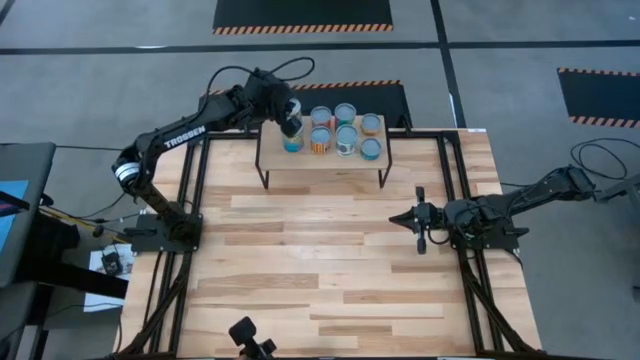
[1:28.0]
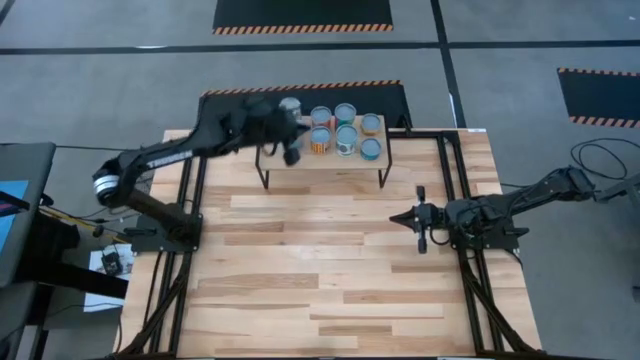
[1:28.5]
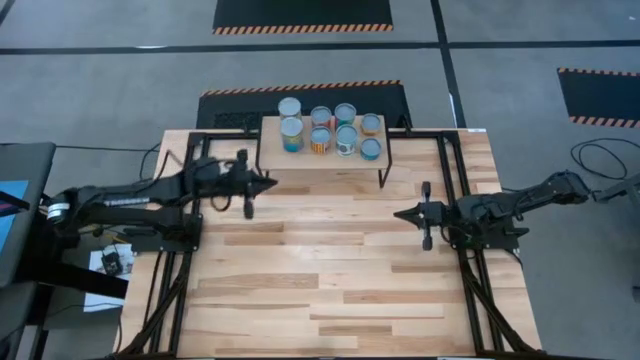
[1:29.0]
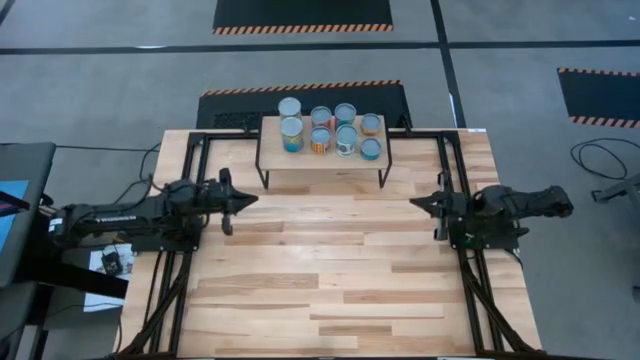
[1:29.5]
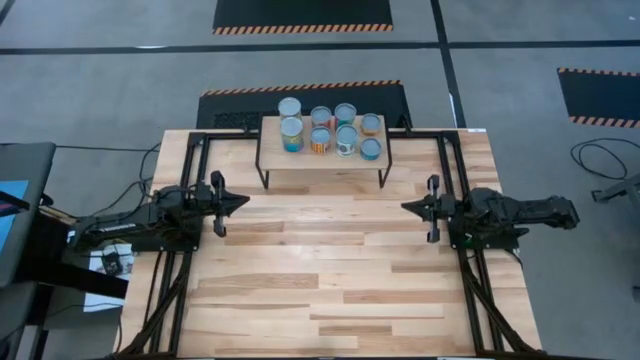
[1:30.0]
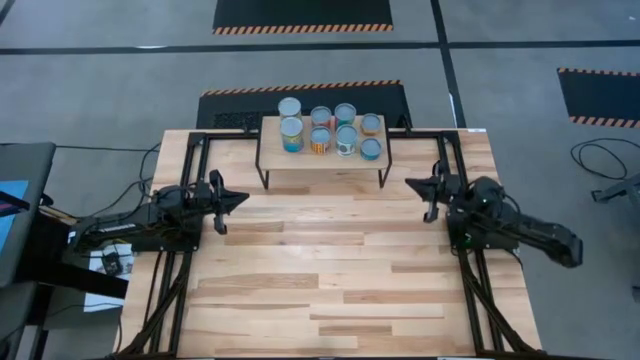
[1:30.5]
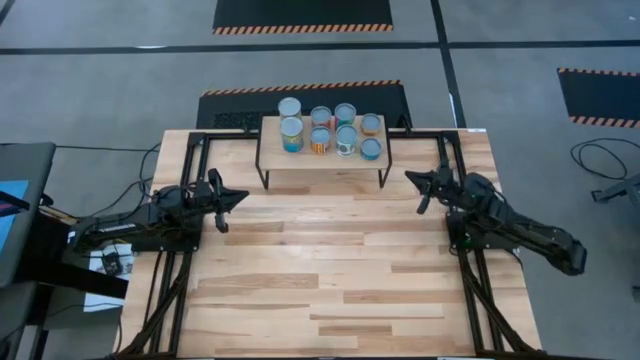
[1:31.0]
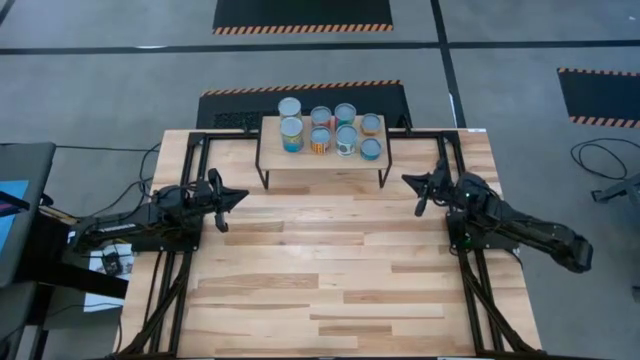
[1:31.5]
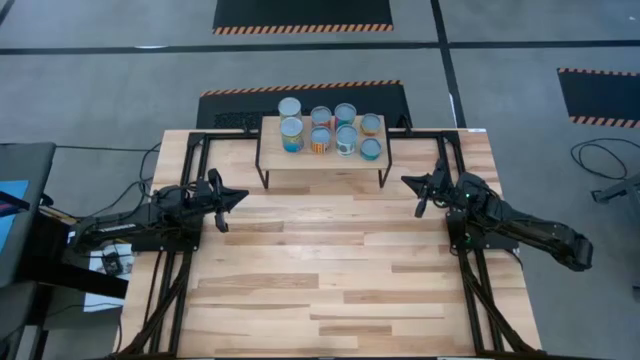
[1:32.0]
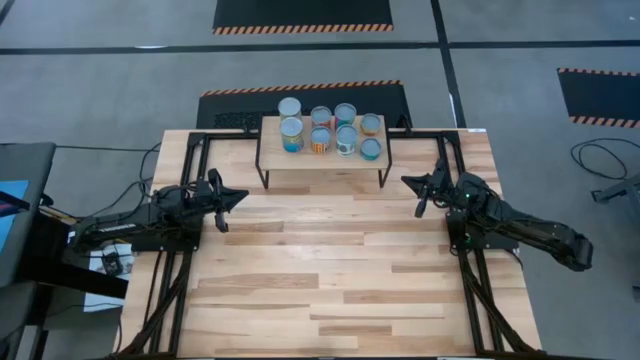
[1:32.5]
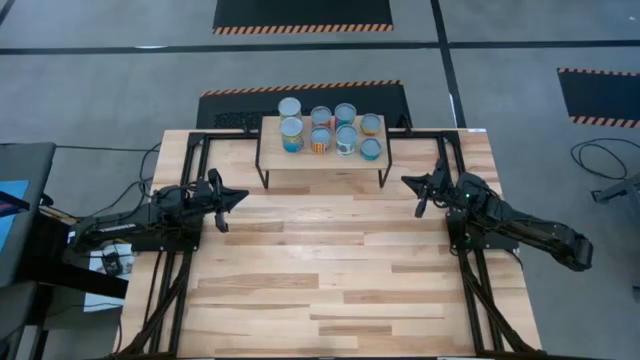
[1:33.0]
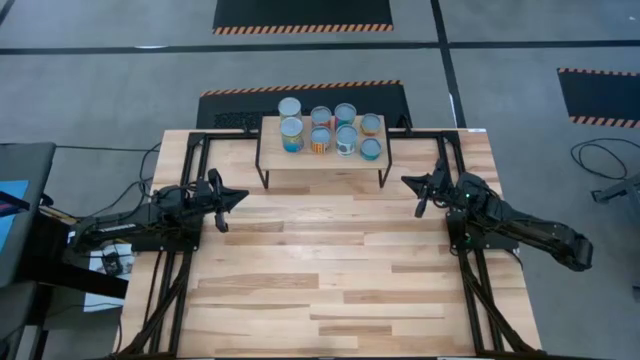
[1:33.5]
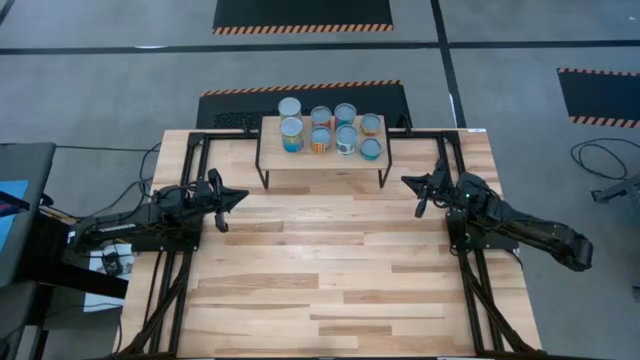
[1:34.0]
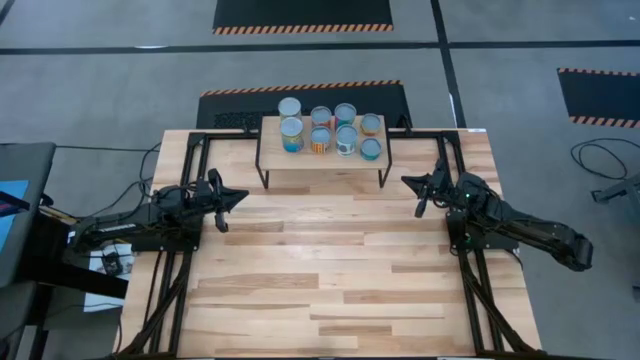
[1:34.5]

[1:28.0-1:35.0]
Task: Pick and place cans onto a shelf
Return to Home Position

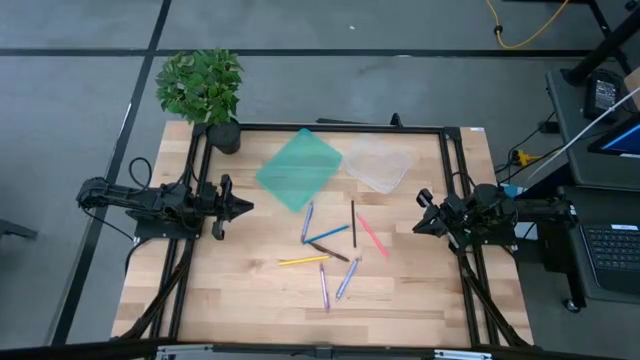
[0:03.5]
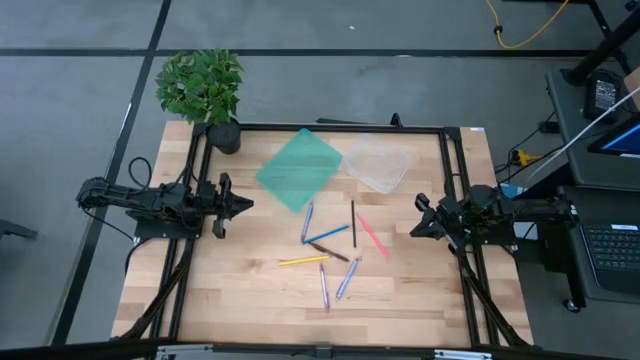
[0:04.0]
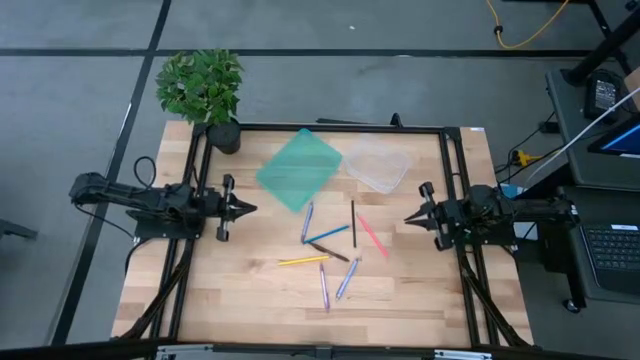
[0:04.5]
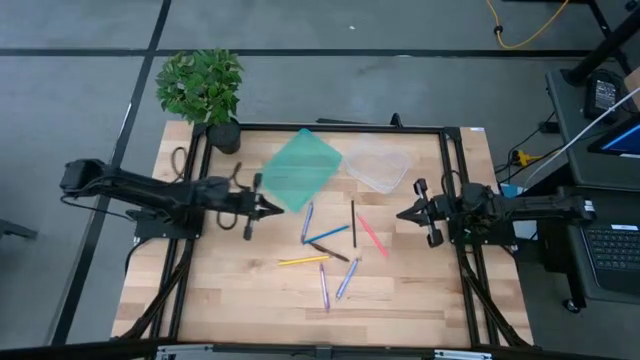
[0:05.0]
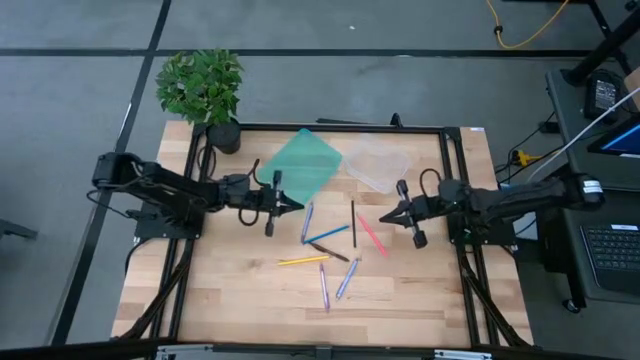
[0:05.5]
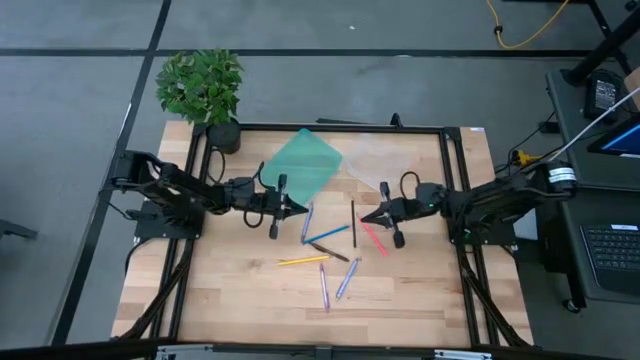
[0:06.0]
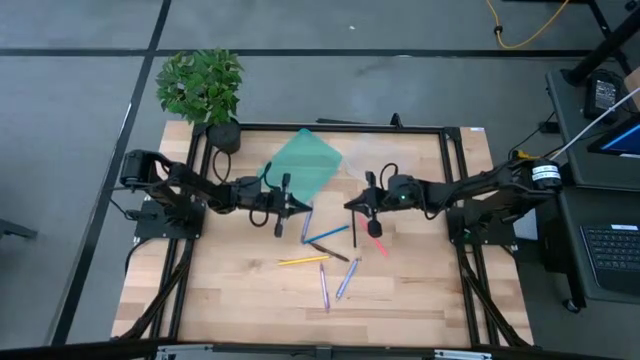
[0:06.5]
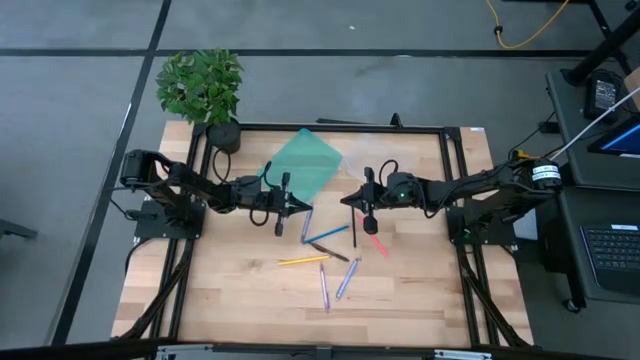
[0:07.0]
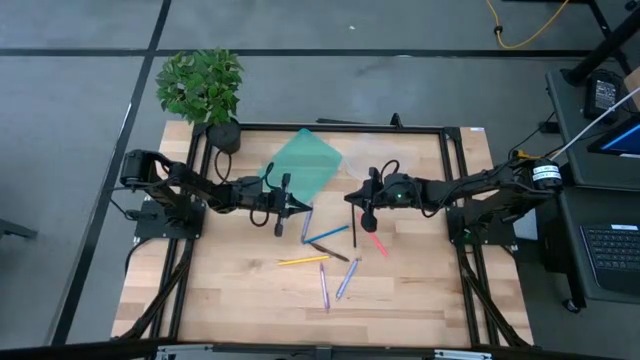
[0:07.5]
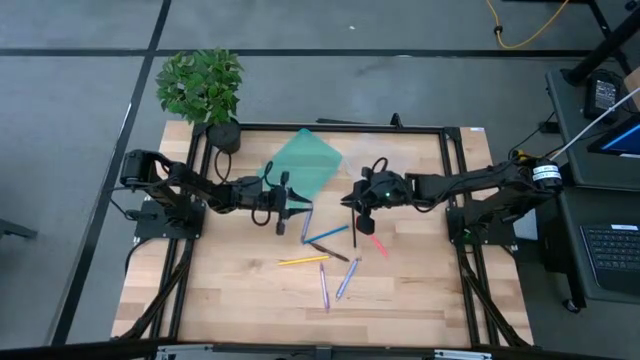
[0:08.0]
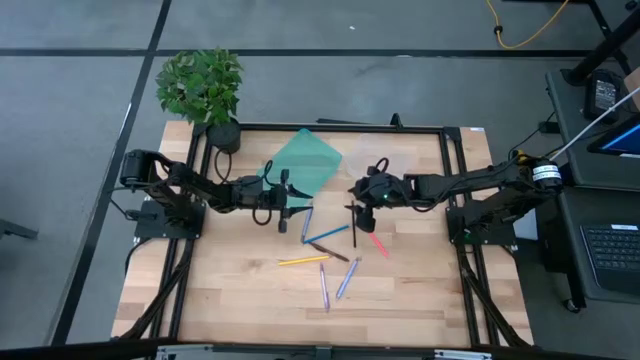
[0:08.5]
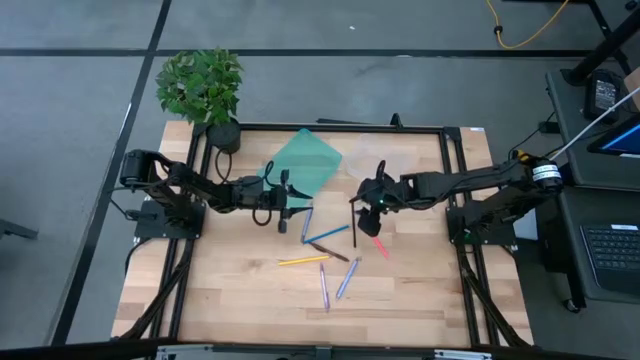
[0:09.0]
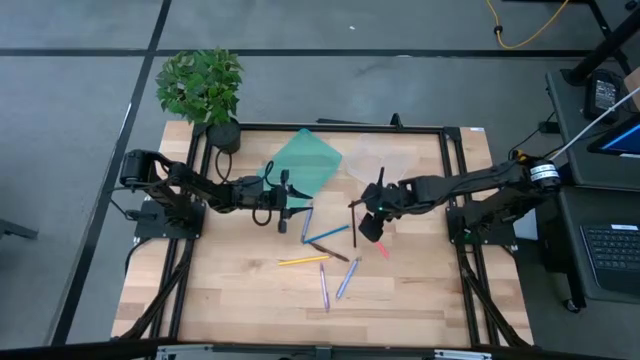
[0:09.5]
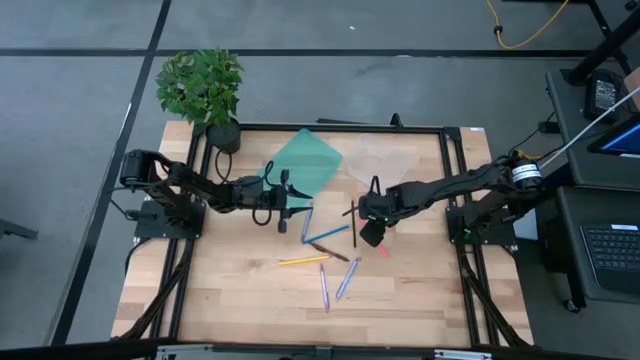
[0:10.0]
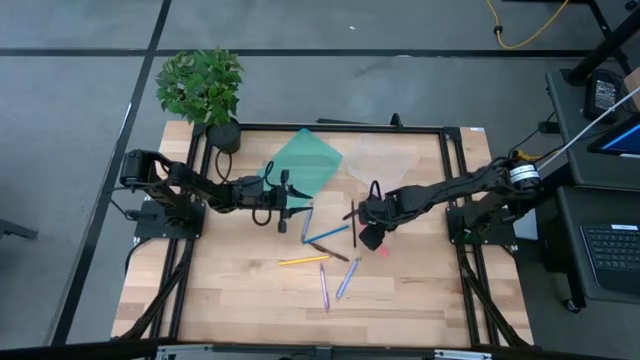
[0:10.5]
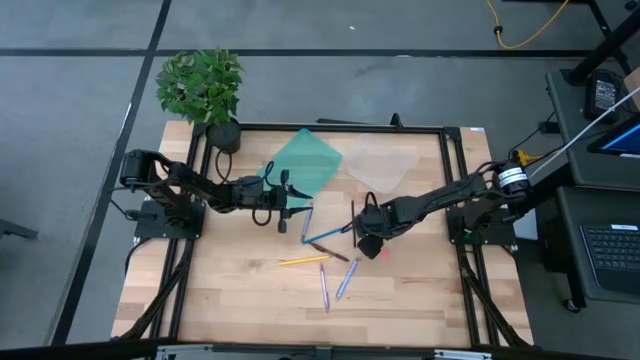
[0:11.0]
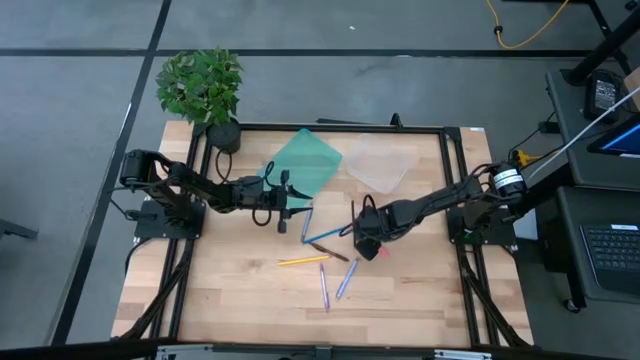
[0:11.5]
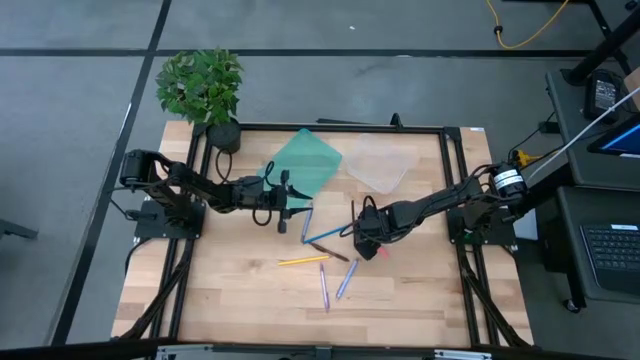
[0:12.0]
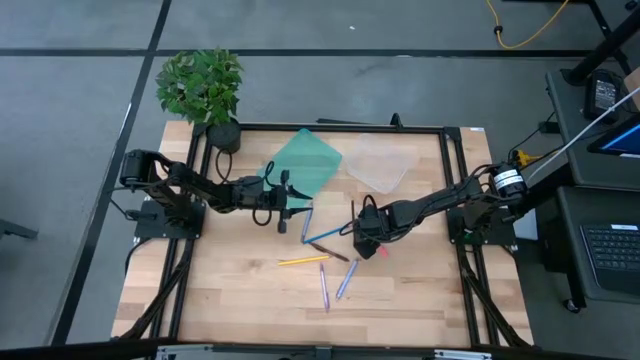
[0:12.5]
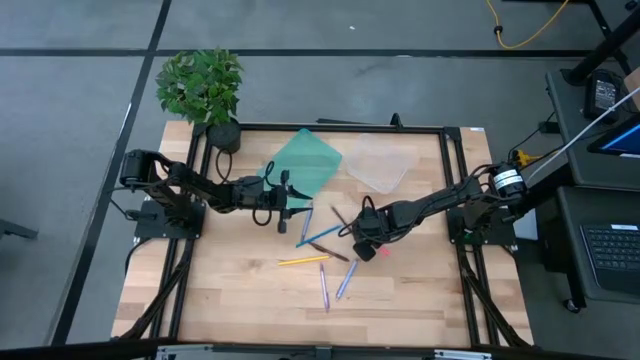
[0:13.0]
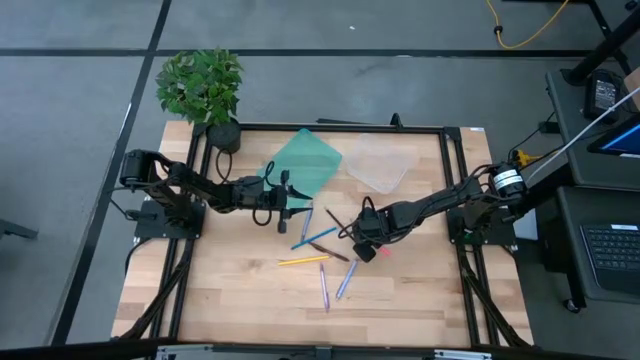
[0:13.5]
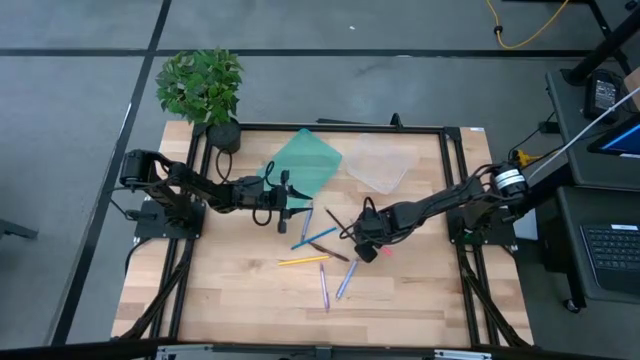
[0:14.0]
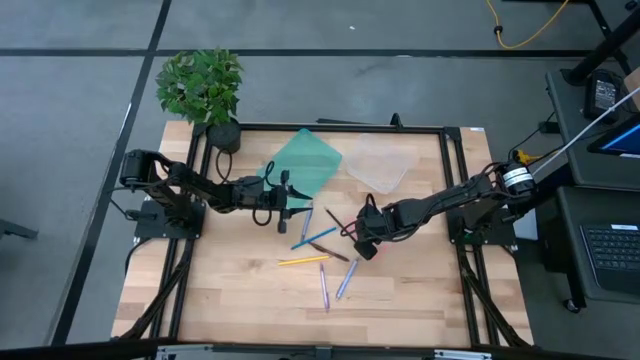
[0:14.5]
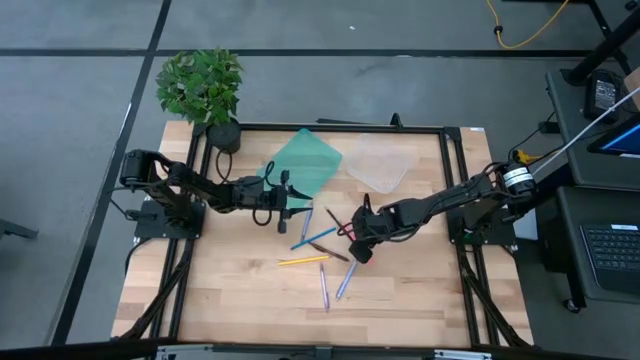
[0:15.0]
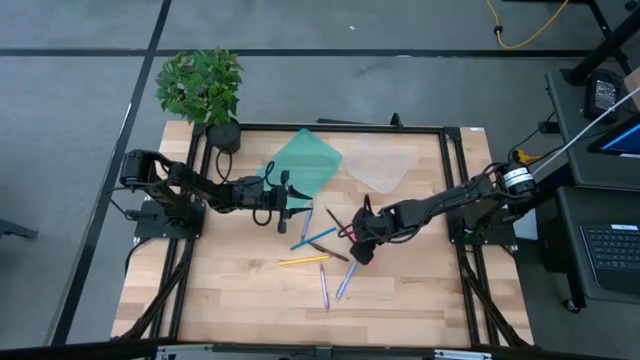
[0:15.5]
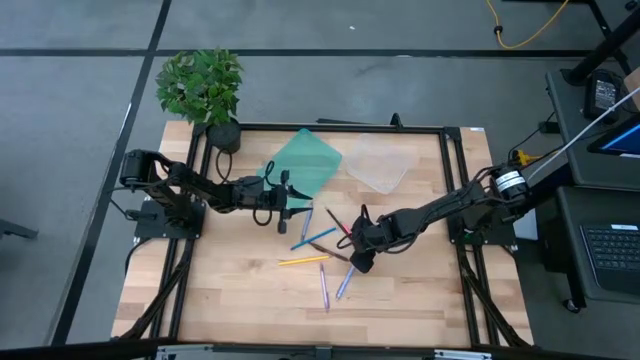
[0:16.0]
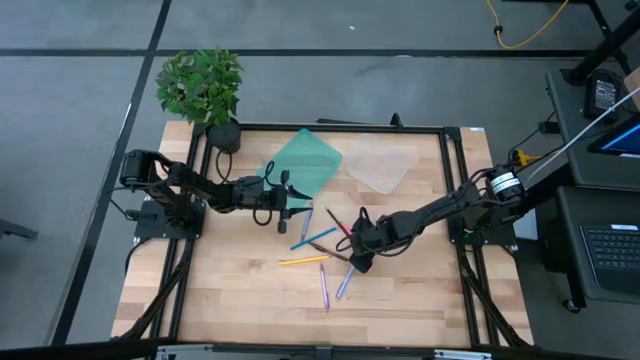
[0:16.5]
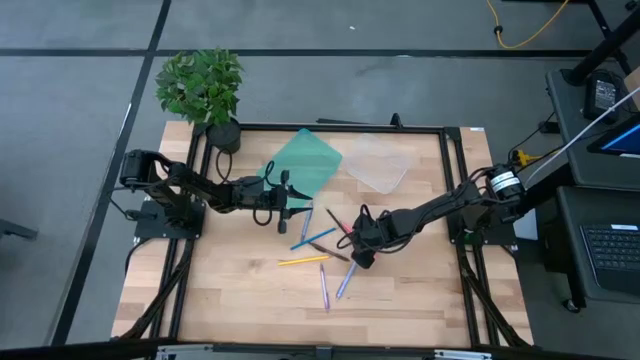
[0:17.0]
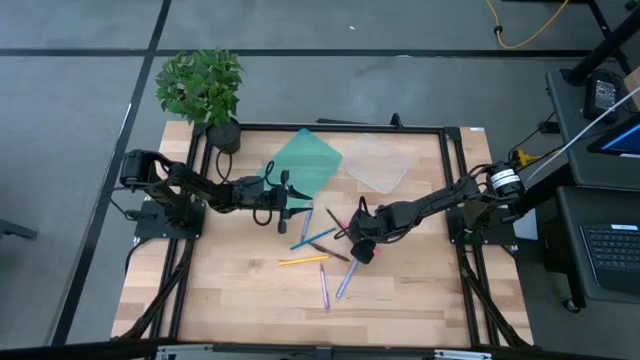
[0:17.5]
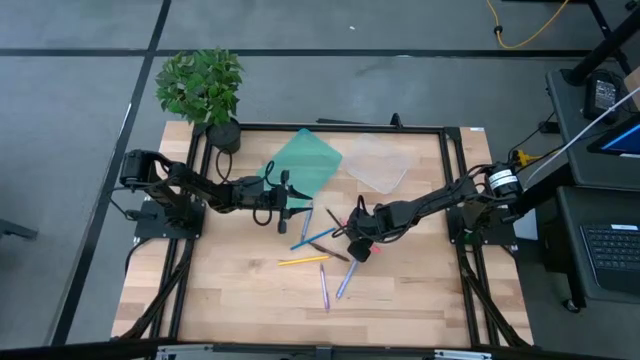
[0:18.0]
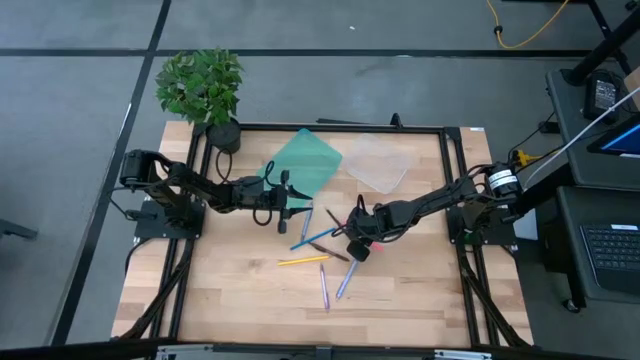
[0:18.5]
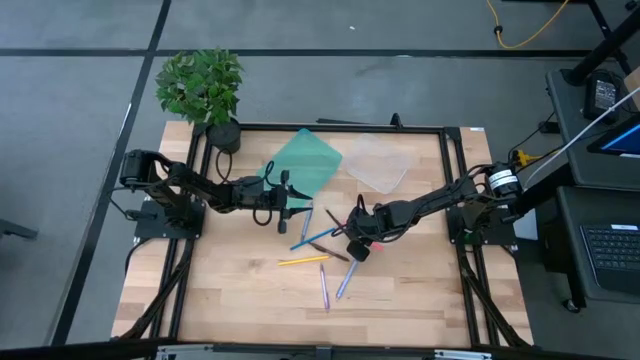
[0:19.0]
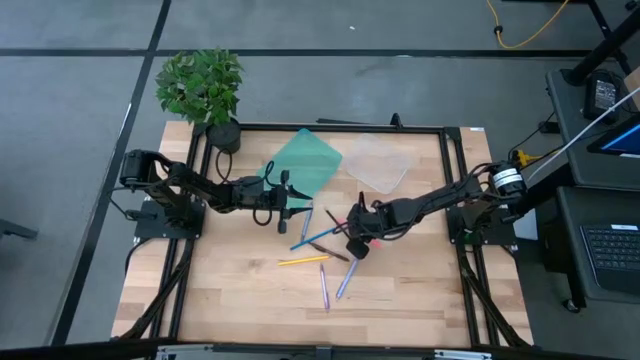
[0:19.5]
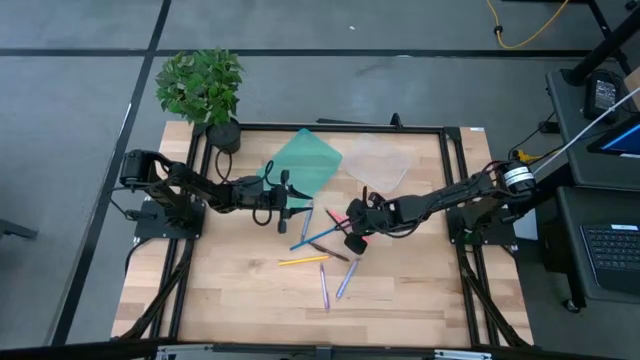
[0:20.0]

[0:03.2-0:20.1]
Task: Sort pens & pencils
Put the pink pencil into the blue bin
